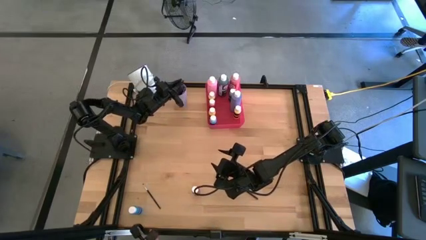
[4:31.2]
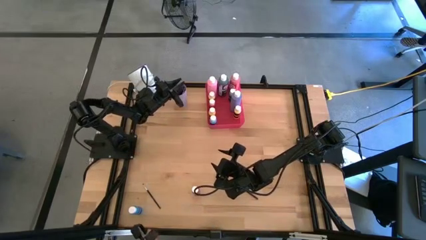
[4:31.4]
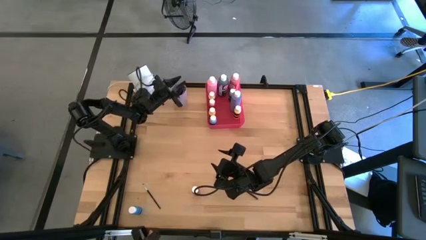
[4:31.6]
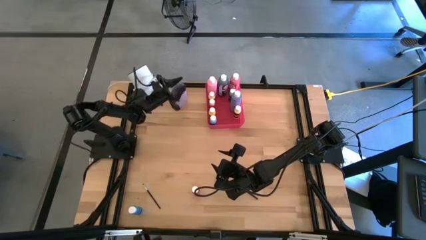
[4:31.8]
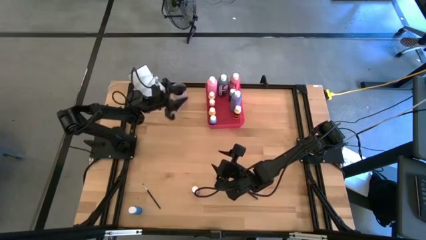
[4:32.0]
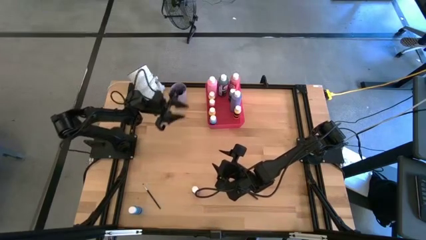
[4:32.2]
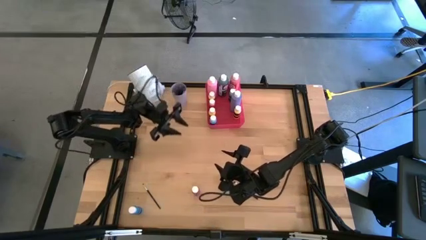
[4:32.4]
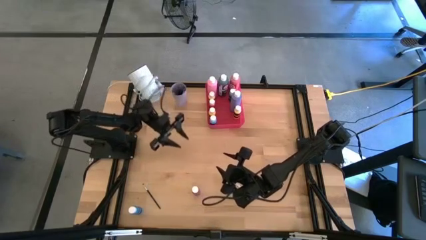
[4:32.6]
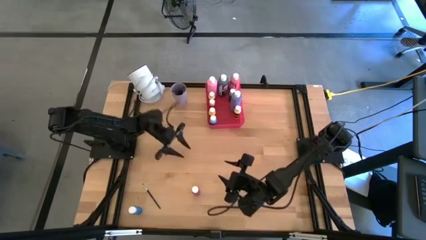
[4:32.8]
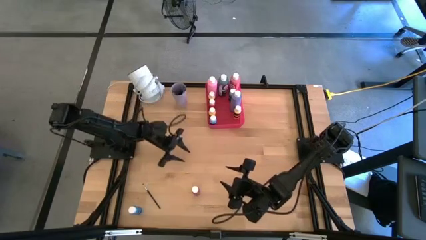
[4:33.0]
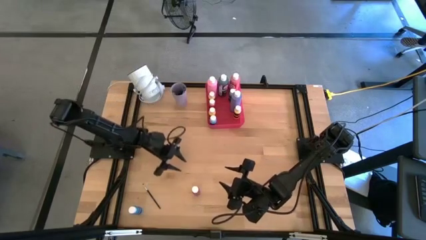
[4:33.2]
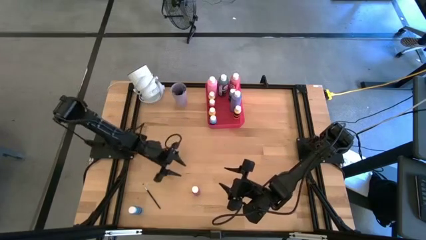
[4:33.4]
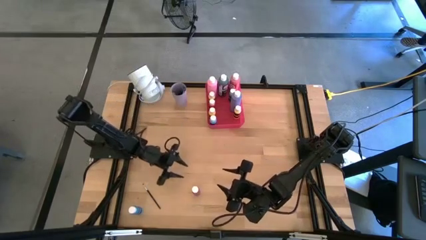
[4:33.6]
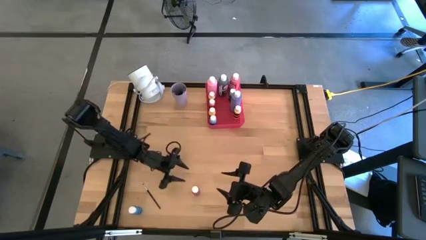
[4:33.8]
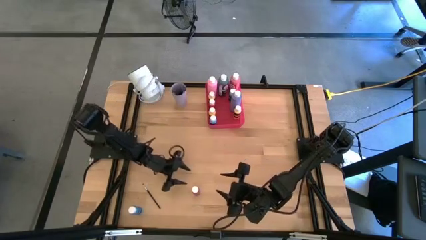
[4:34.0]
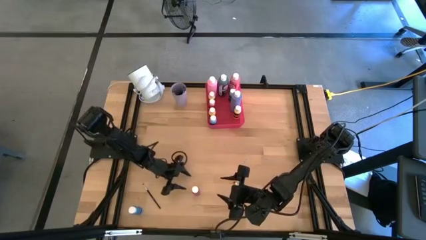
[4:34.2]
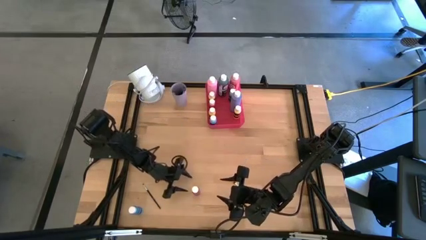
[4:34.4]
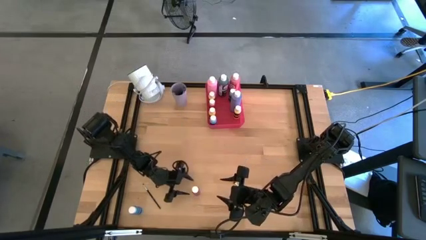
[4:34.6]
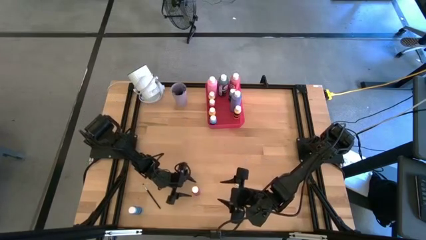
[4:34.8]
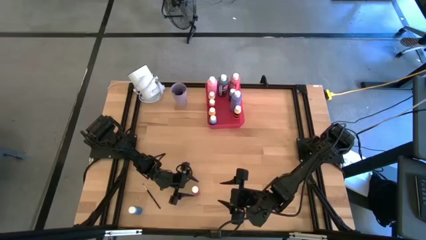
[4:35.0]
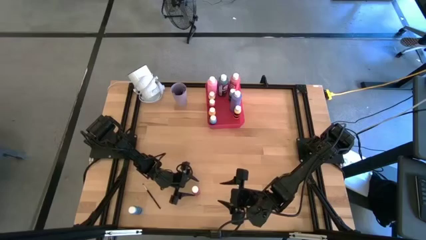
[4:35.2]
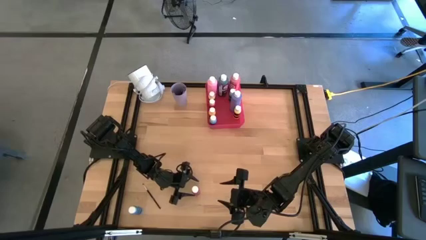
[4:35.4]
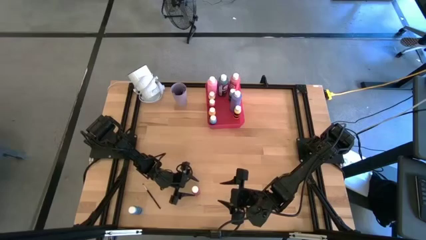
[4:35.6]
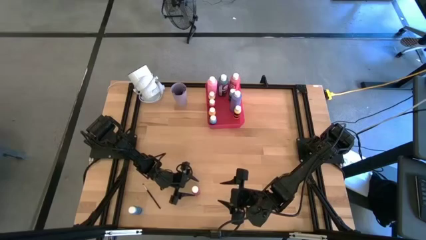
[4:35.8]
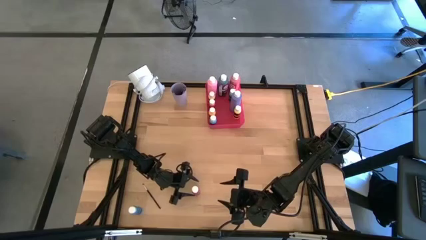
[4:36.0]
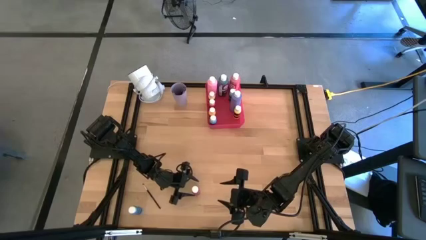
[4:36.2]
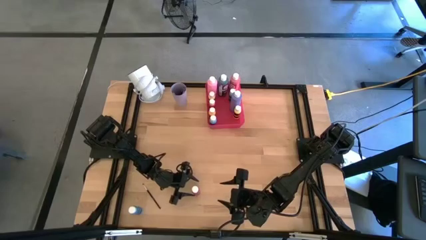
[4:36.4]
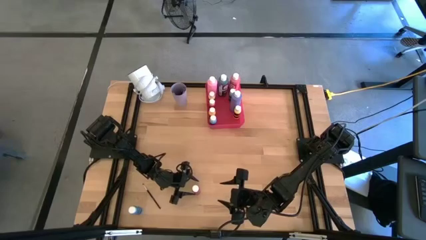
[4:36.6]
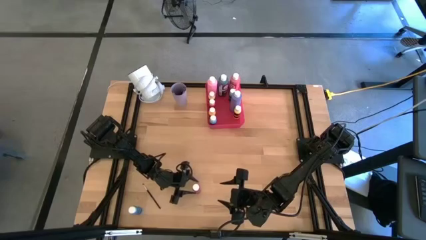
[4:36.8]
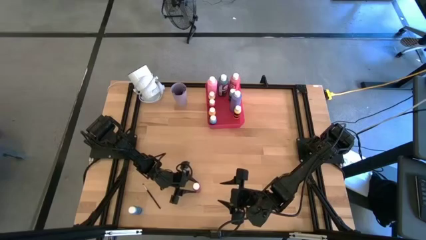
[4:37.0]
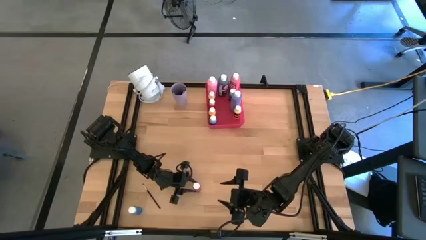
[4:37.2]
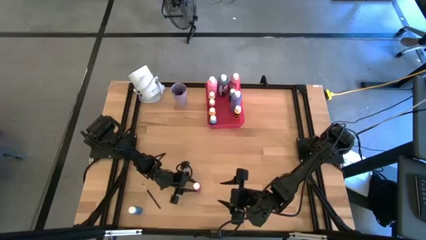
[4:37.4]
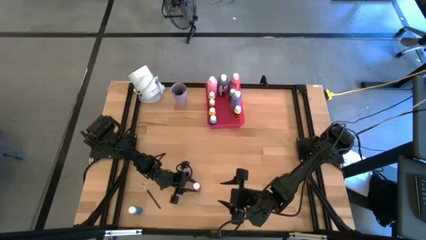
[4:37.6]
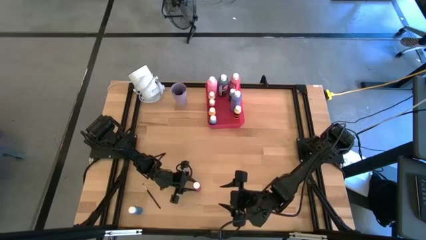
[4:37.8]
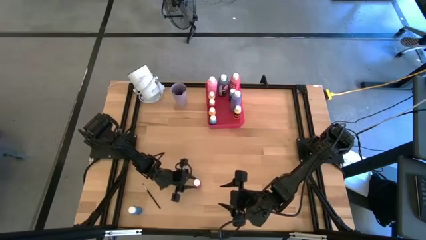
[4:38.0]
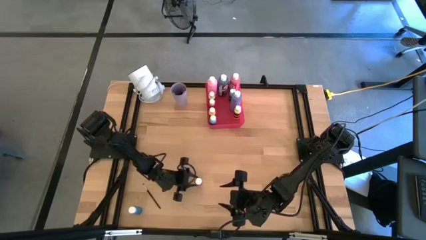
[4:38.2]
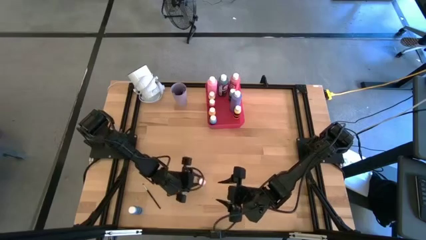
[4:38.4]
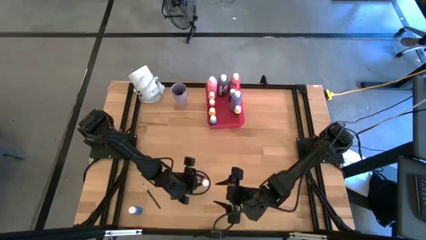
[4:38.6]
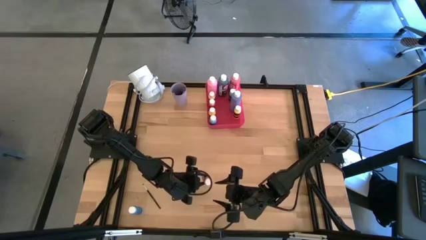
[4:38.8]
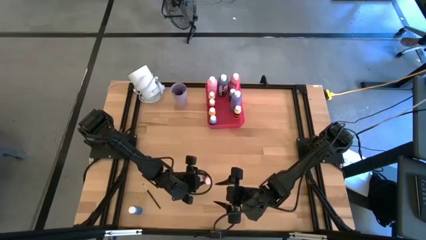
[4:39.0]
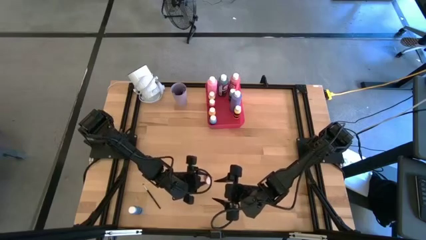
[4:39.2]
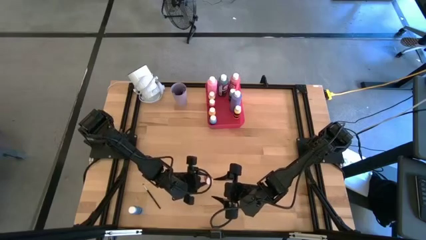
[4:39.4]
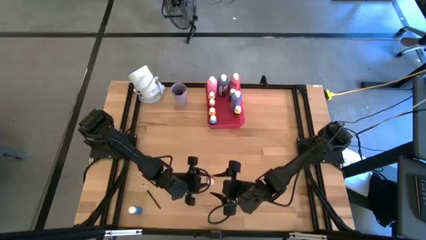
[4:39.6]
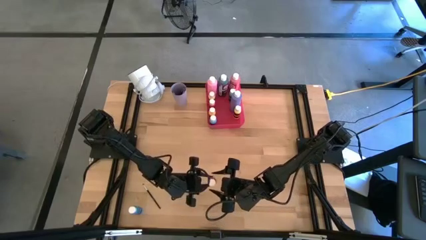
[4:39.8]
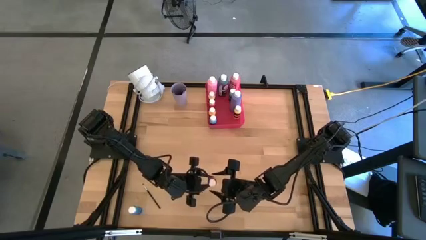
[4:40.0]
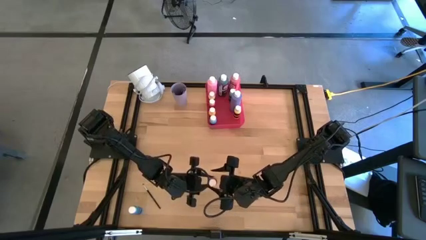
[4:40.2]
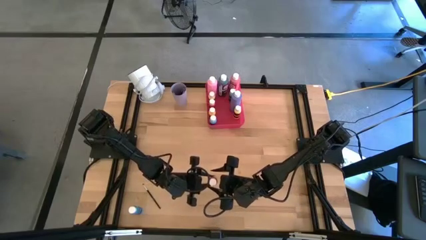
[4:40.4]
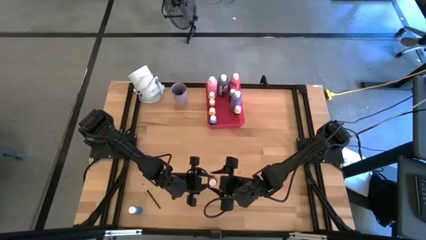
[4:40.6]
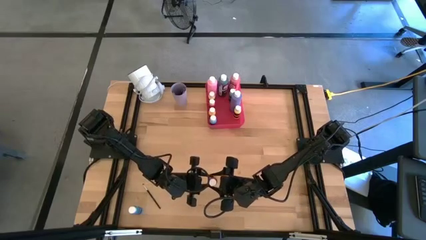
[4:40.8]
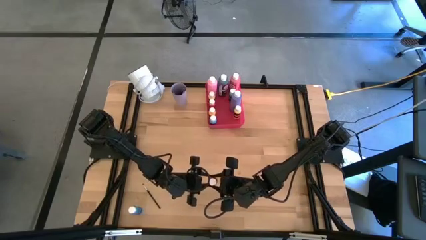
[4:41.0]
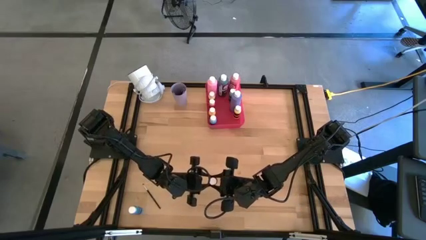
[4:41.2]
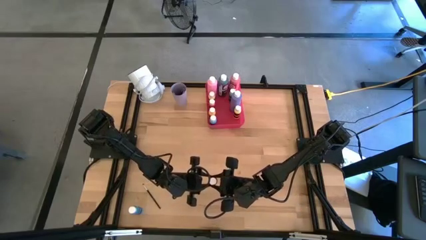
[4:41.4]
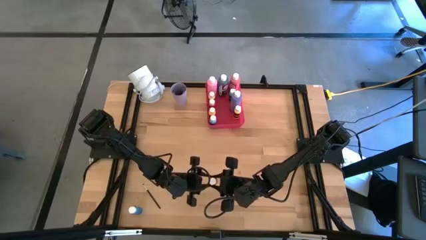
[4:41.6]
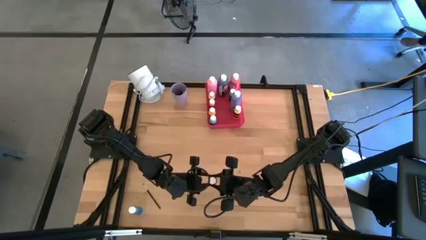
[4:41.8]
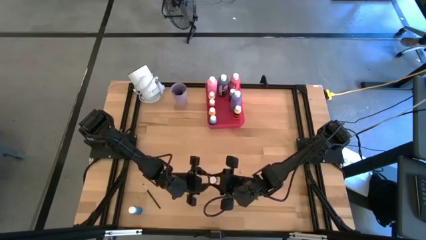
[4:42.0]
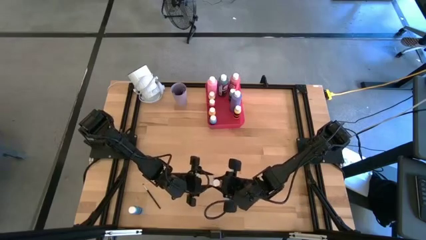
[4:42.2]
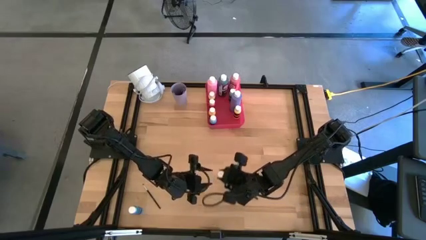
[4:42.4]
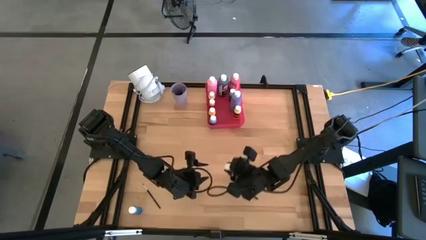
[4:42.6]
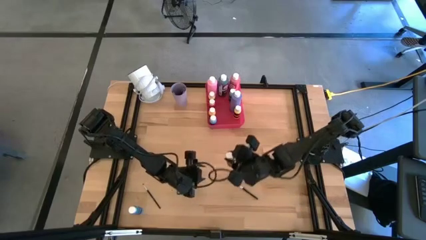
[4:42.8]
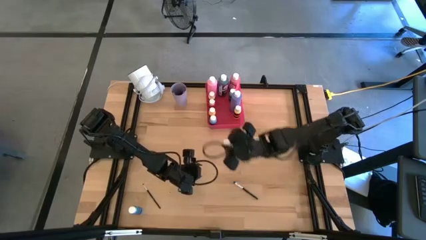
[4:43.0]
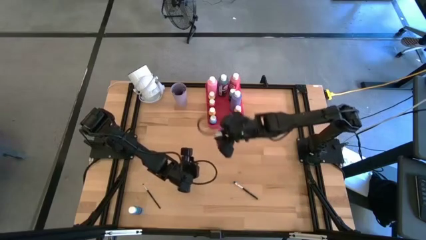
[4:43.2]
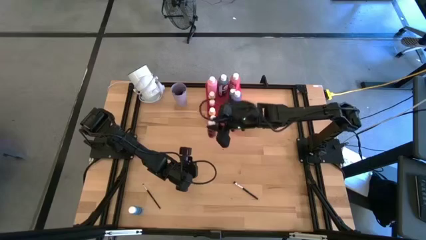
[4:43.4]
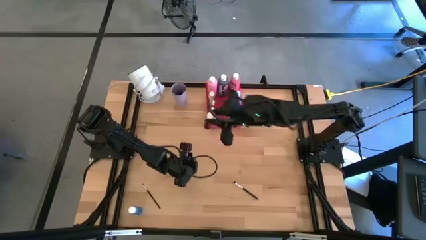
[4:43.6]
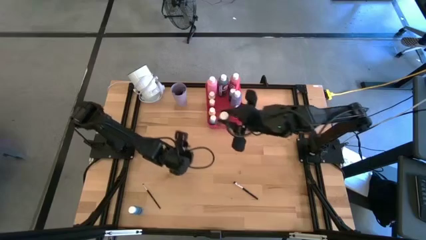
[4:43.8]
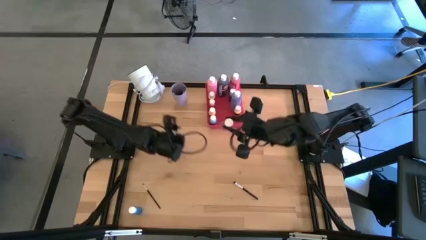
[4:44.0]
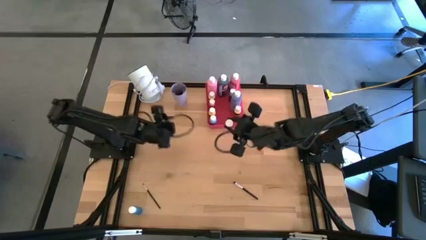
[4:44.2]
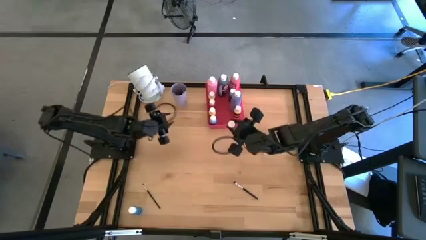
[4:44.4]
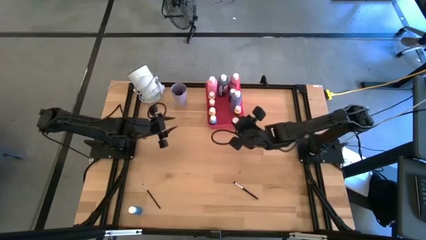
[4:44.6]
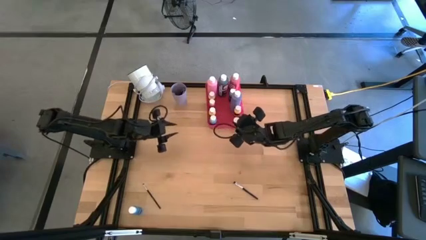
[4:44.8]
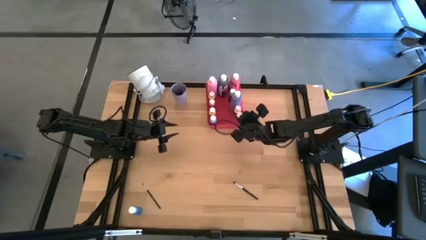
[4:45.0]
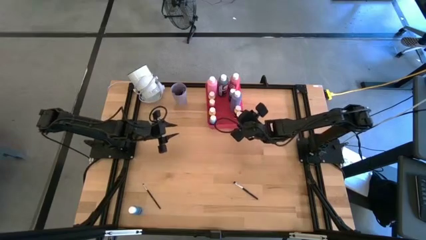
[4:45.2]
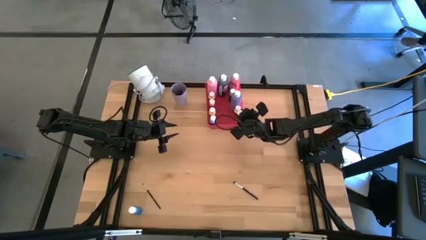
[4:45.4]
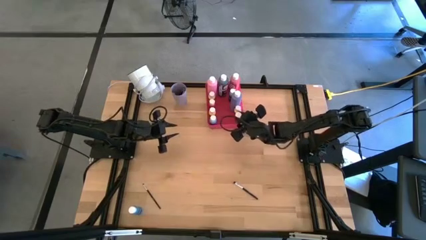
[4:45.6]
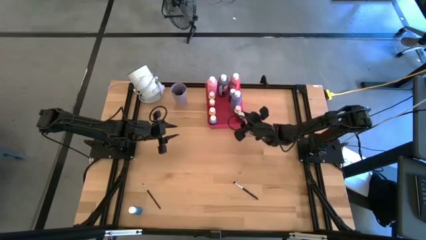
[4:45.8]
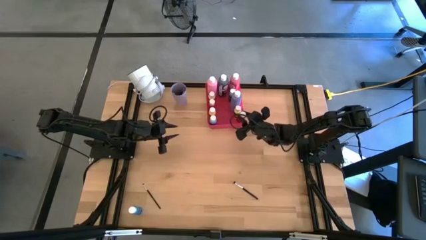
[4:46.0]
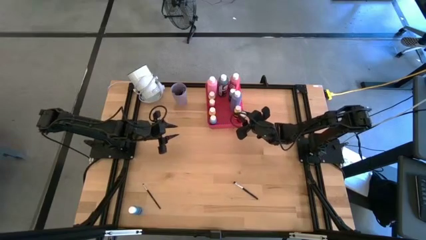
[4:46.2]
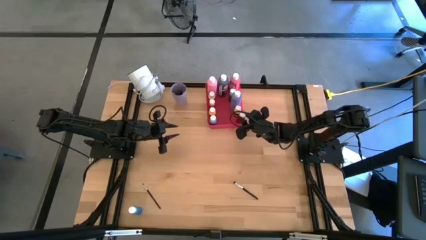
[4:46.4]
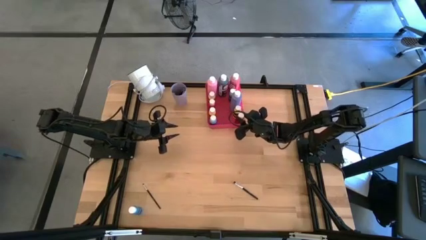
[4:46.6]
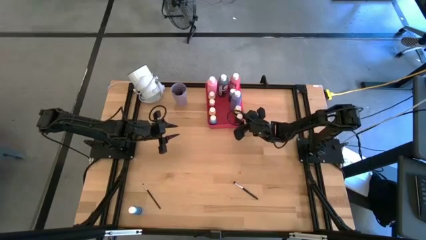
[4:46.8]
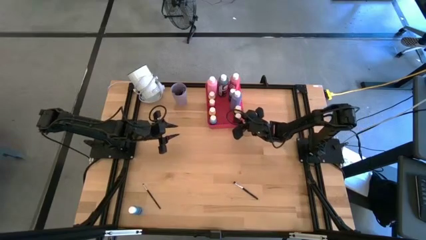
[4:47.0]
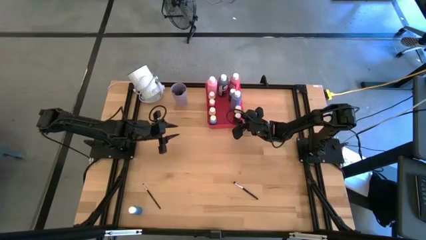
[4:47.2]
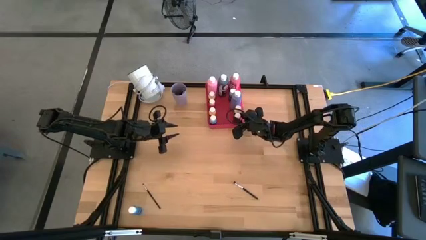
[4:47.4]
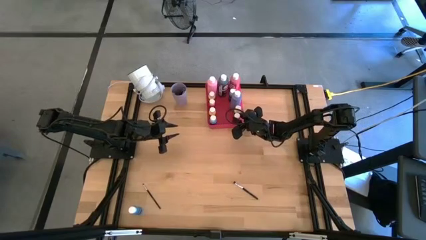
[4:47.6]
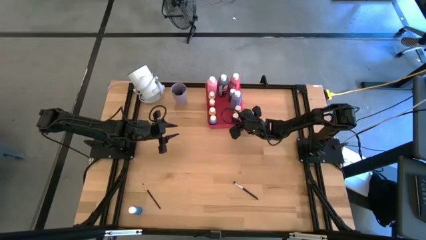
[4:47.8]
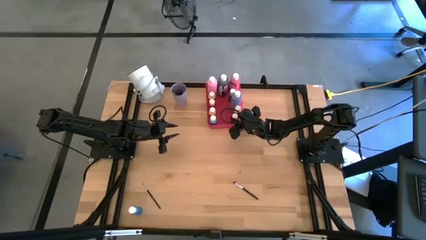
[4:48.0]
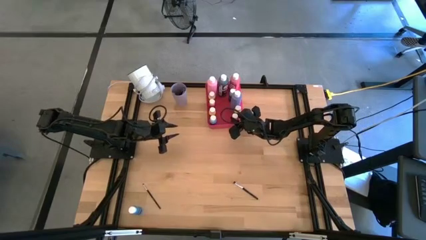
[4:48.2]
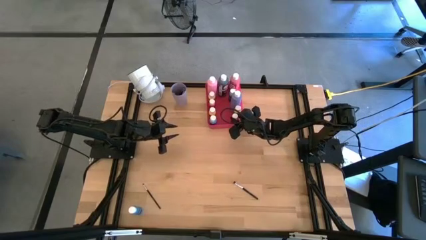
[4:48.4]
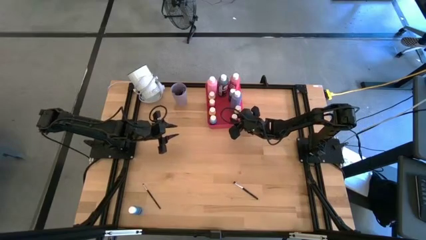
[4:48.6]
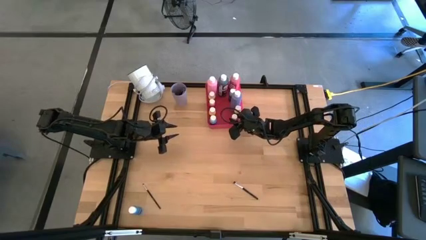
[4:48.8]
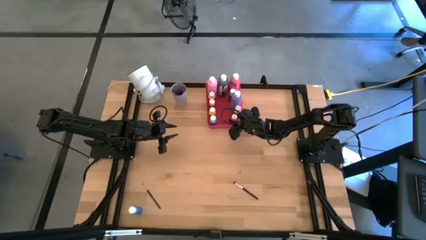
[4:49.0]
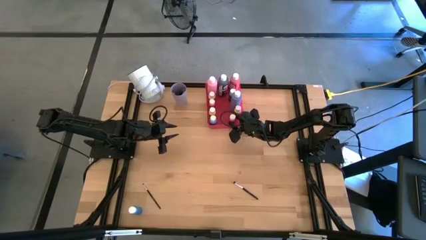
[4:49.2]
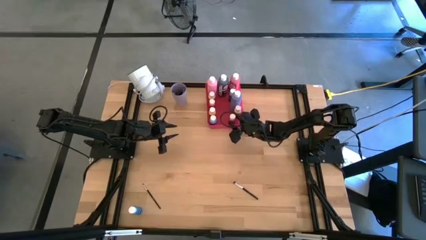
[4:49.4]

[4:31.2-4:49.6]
Task: Pick & Place Paint Supplies
Put the purple paint bottle into the red bin
